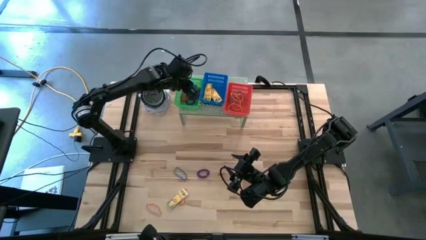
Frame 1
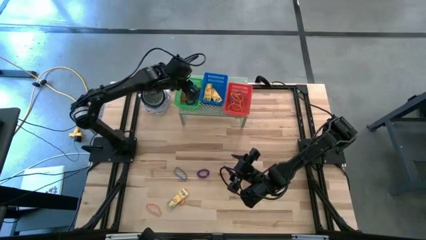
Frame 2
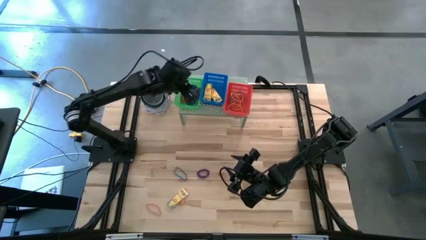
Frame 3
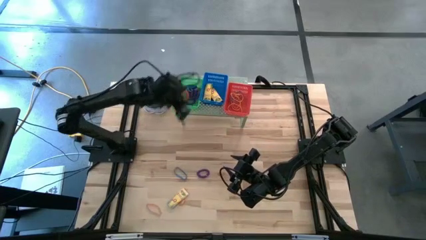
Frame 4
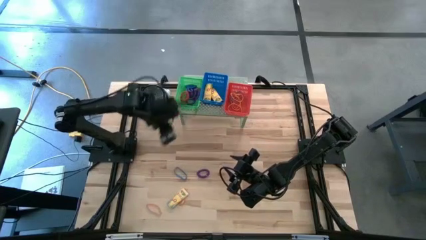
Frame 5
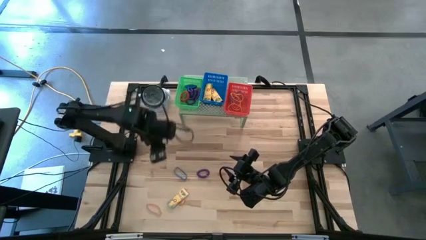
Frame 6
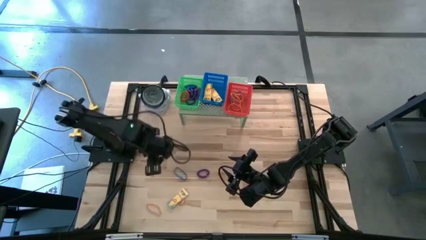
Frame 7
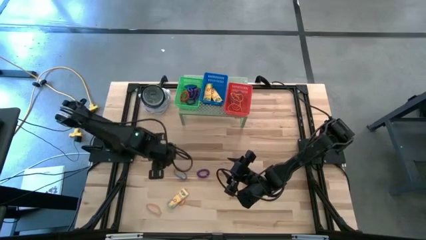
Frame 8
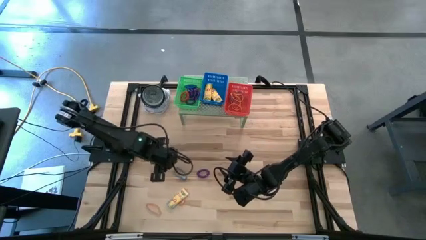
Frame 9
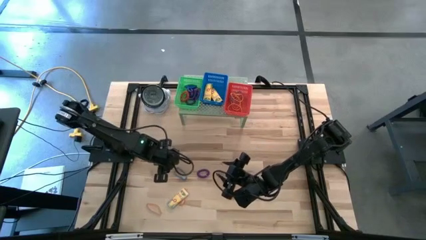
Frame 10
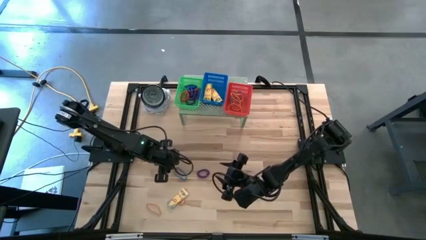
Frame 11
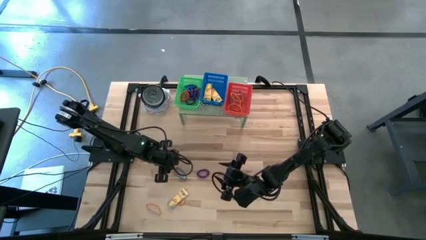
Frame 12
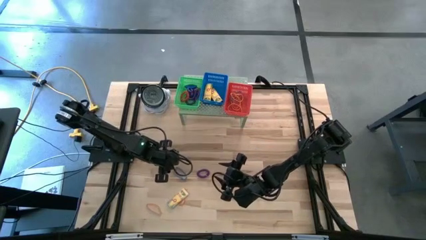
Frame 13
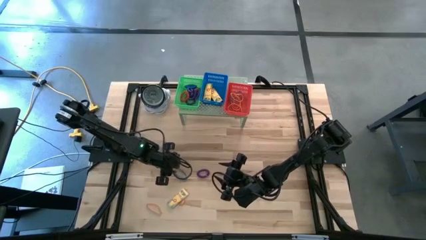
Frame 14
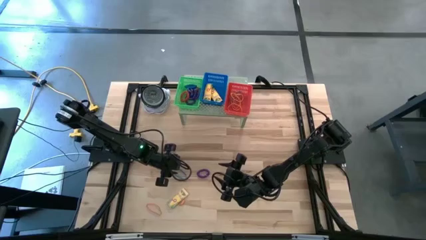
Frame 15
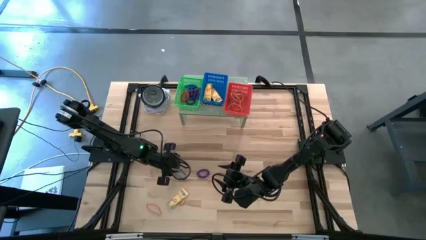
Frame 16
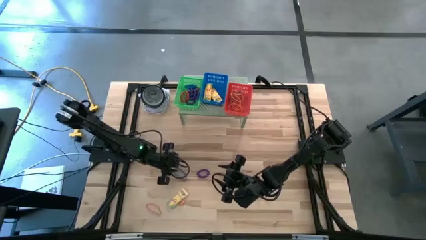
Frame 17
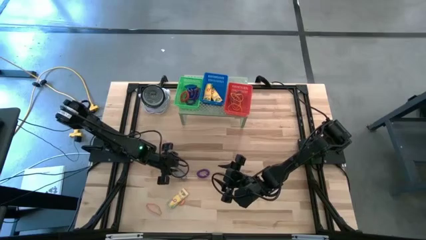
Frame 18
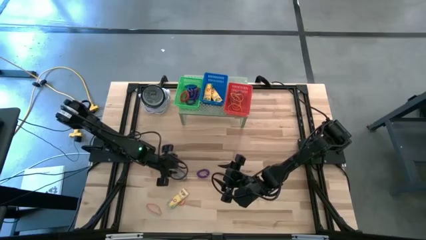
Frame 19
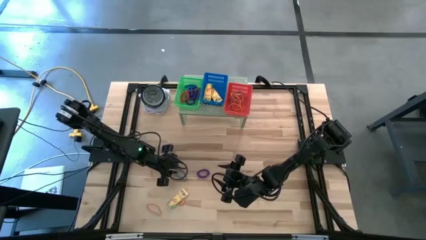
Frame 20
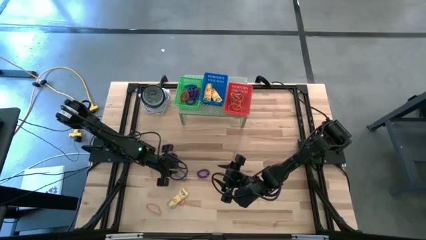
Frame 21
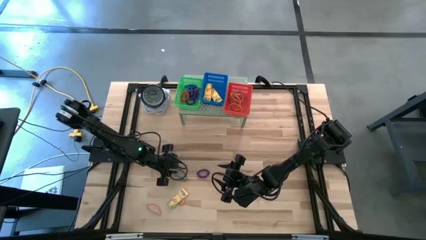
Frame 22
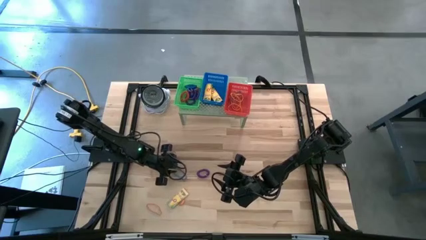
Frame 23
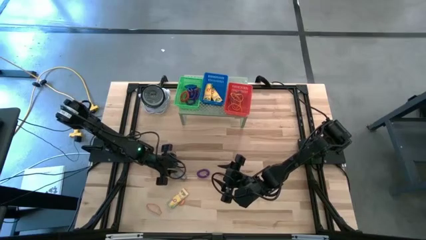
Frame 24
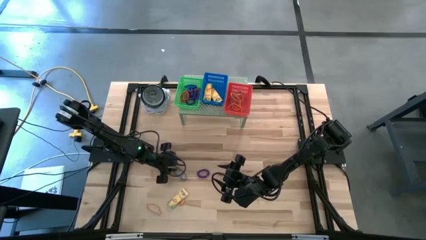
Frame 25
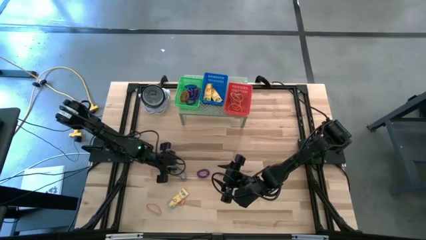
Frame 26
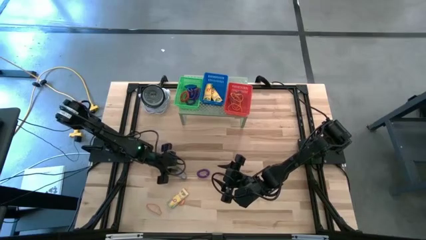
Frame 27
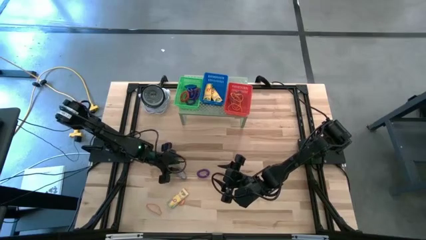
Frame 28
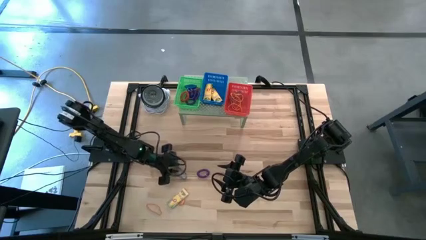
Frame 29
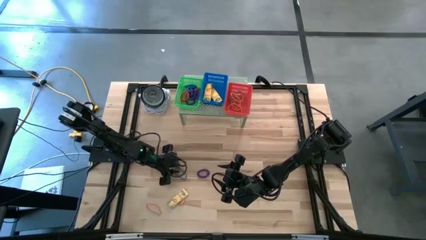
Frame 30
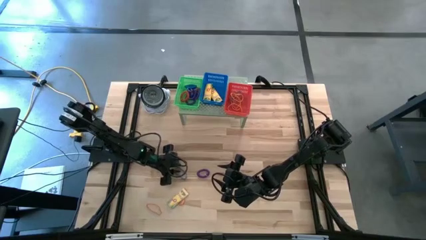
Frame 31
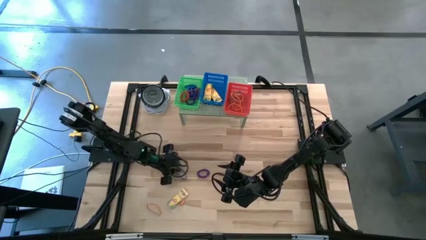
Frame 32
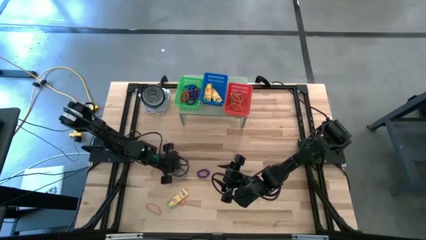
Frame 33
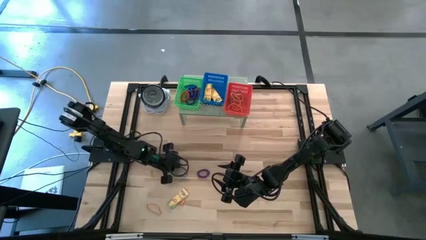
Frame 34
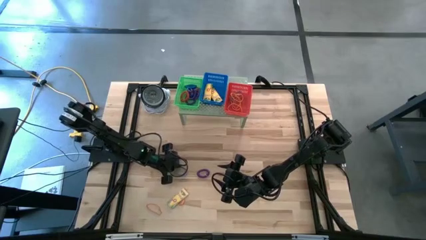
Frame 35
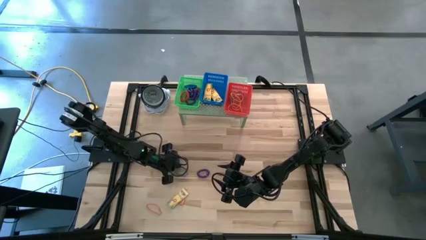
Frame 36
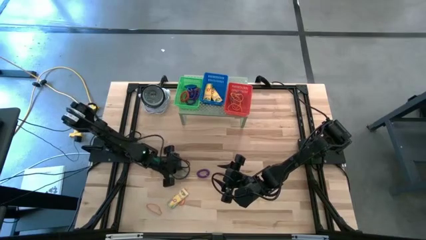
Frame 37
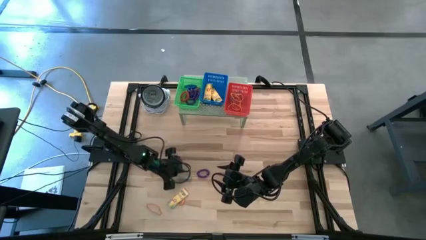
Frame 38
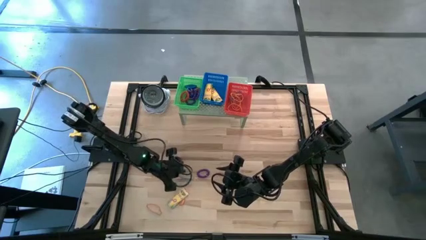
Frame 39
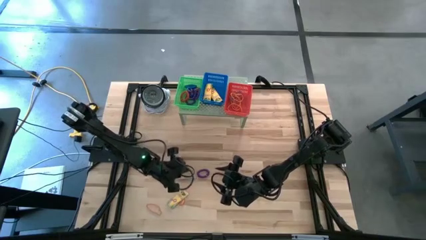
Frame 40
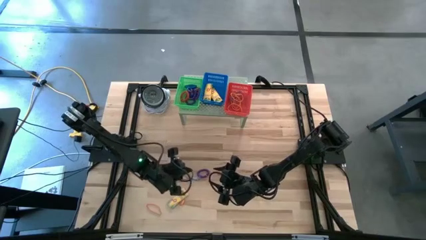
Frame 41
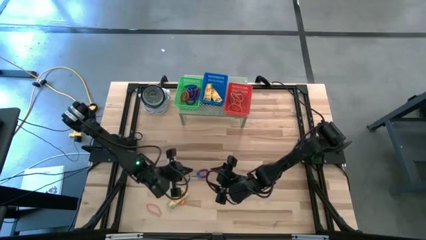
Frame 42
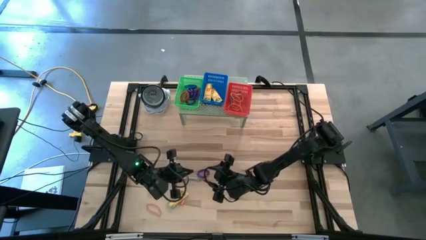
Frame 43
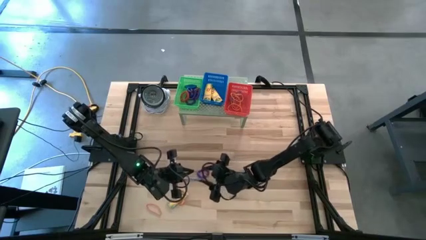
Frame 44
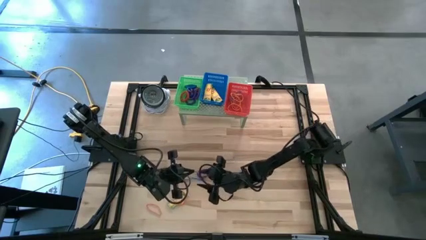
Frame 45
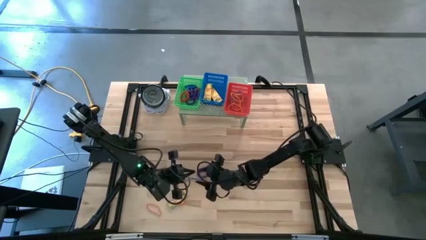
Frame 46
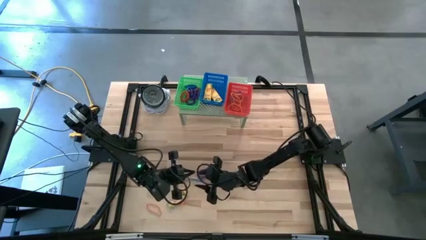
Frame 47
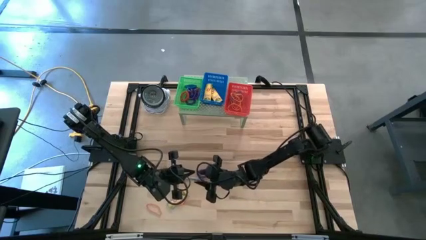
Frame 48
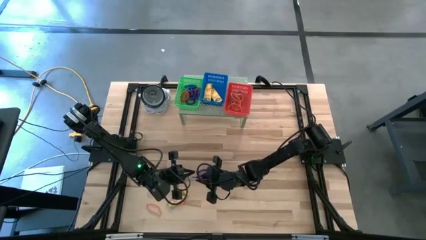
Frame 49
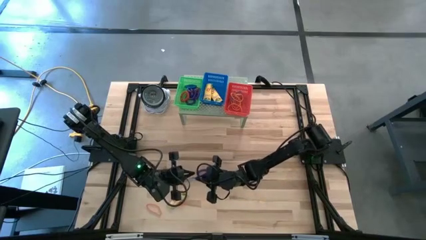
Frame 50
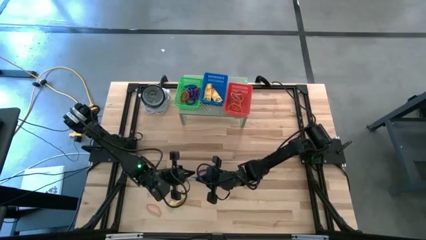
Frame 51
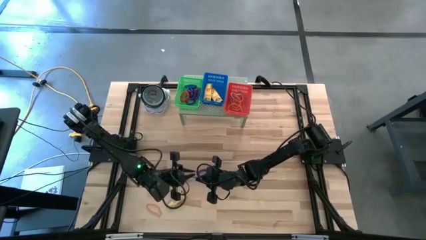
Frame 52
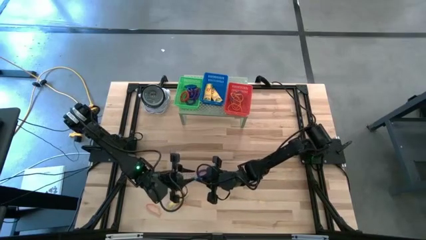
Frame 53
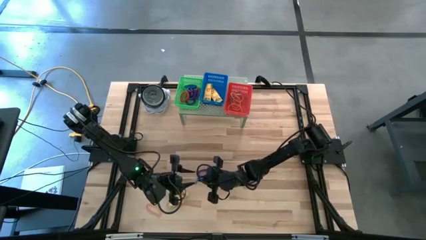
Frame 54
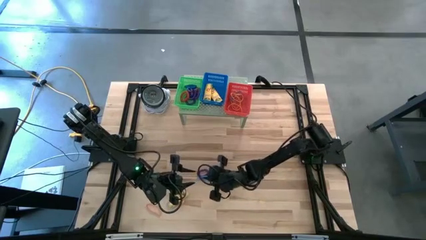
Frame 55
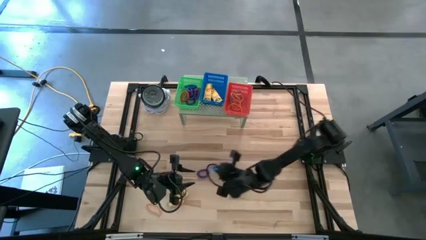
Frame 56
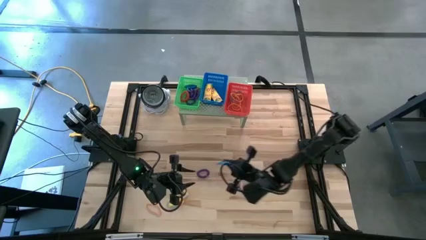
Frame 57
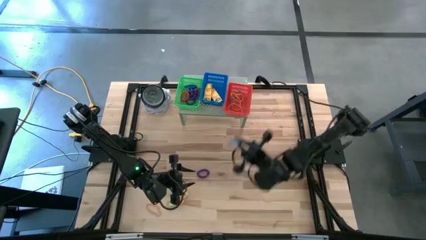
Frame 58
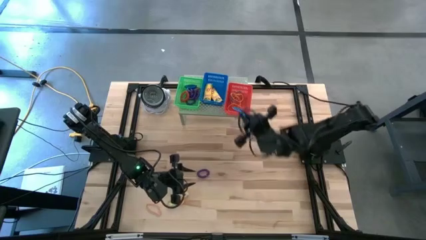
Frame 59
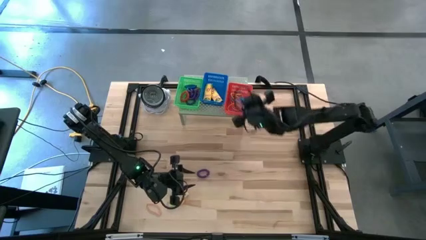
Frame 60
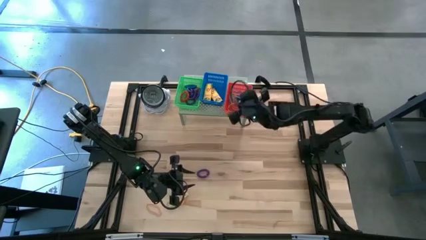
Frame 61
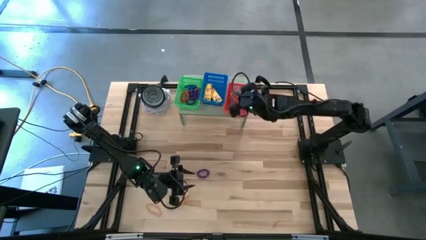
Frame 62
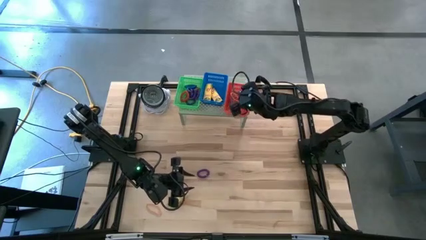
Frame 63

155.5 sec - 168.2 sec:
Task: Pick & Place Office Desk Supplies
Put the blue rubber band into the green bin on the shelf

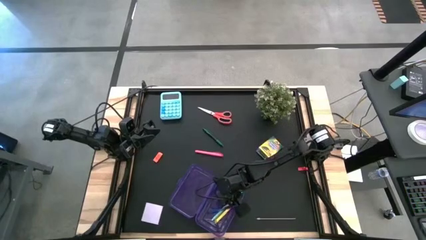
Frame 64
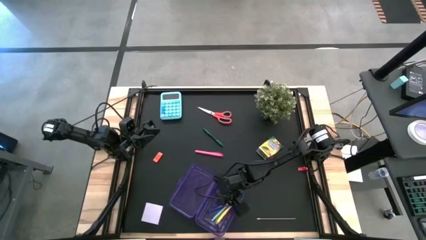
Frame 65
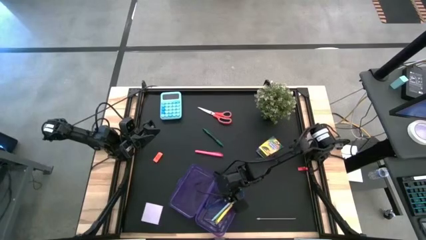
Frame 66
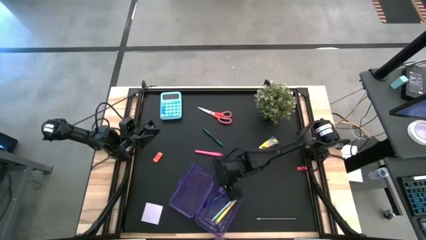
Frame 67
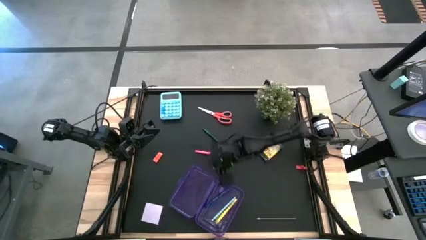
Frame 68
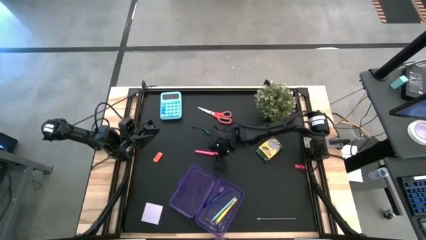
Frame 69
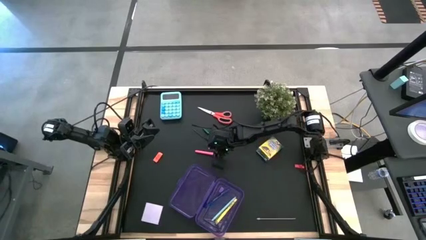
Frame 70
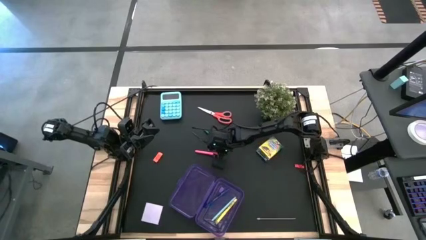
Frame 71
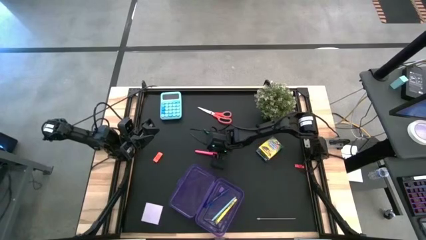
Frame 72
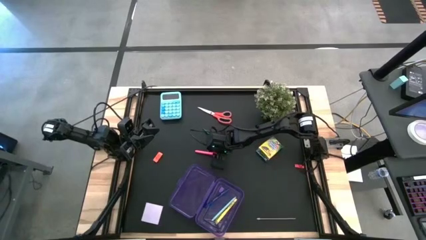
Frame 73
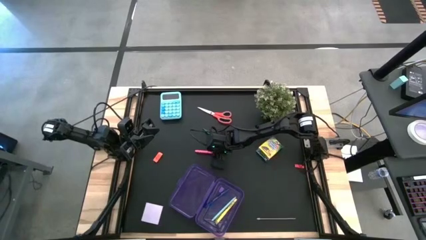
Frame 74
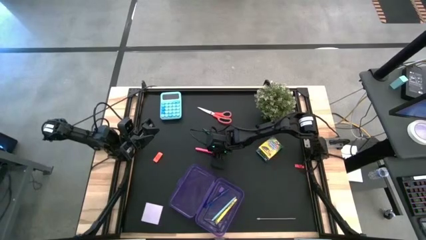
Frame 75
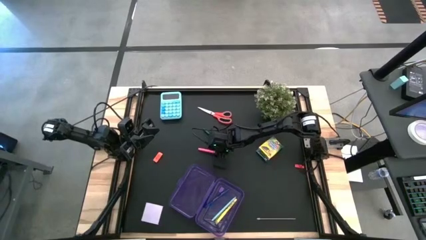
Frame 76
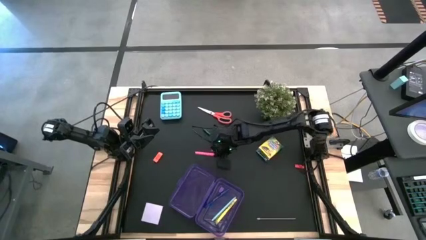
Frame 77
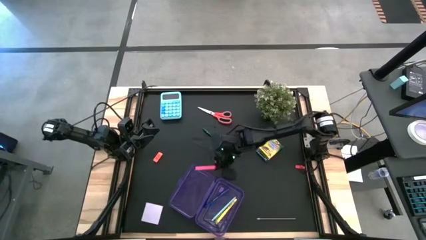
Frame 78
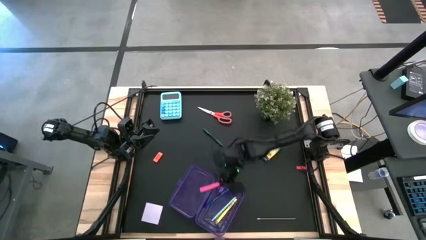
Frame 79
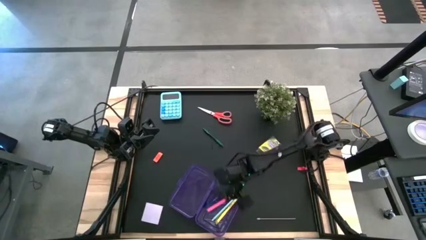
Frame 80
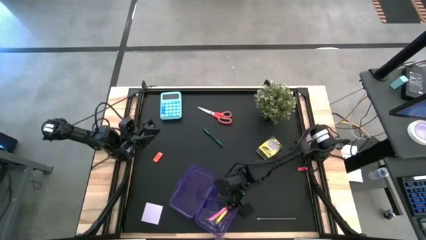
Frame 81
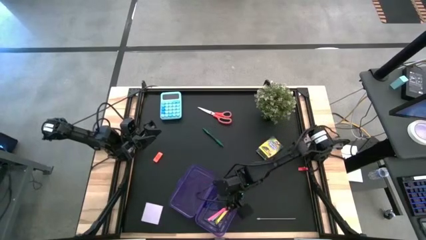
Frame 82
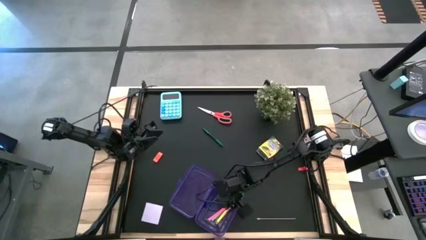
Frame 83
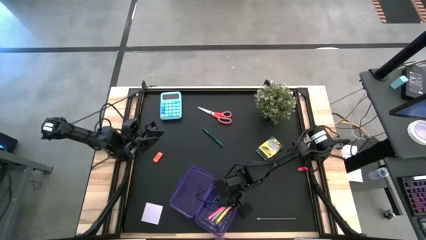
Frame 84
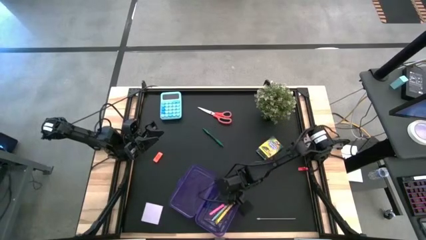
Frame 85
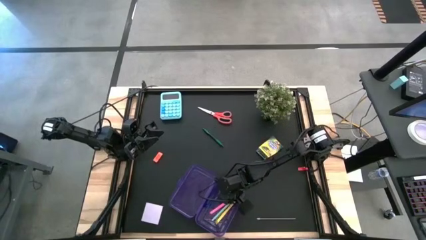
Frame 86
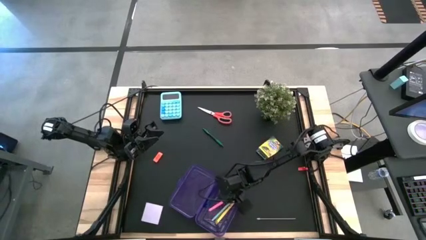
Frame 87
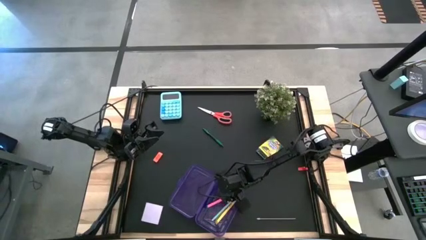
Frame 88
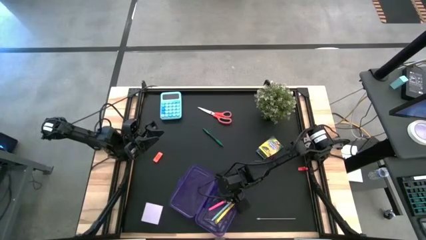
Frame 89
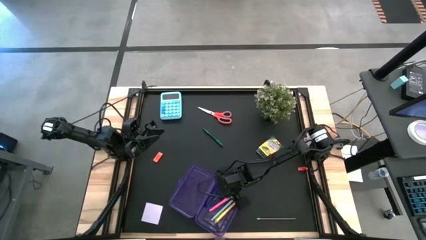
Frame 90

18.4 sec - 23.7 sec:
Task: Pack school essentials
Put the pink pen into the purple supply box
